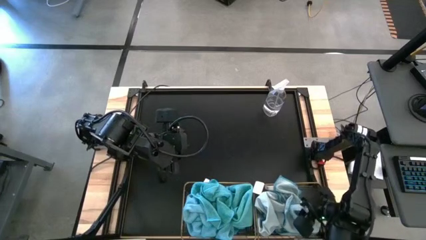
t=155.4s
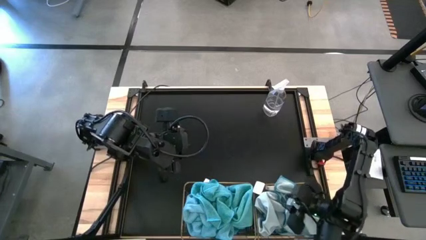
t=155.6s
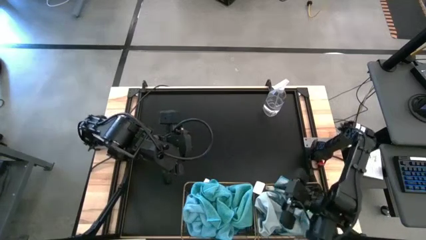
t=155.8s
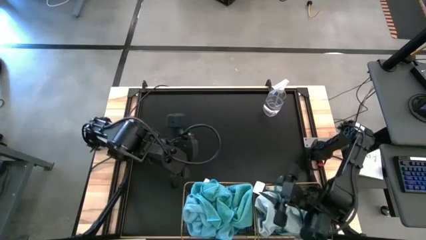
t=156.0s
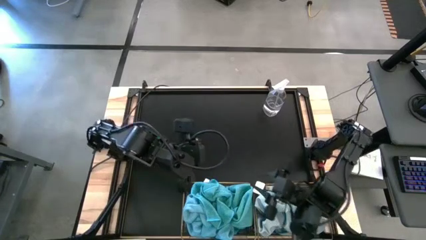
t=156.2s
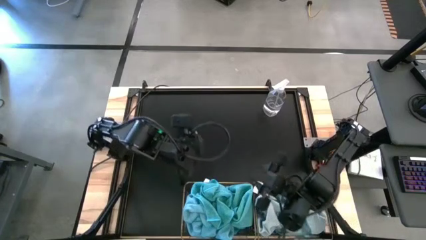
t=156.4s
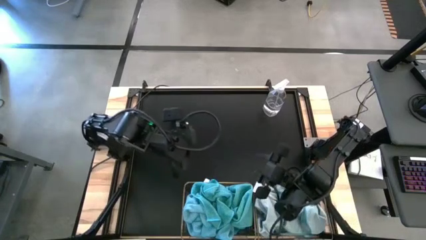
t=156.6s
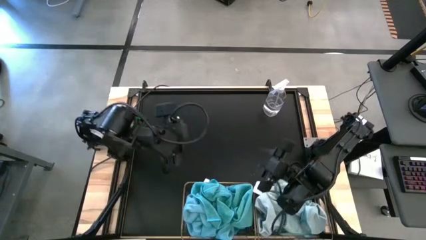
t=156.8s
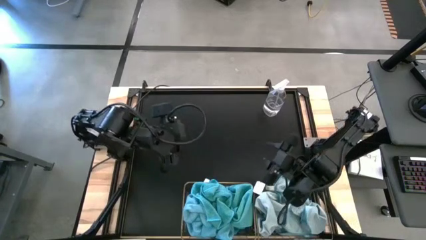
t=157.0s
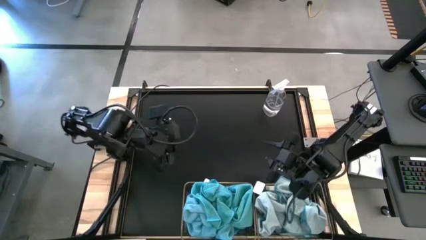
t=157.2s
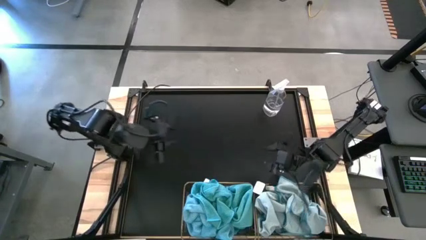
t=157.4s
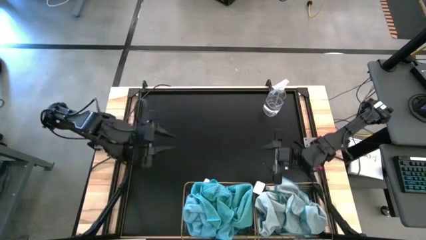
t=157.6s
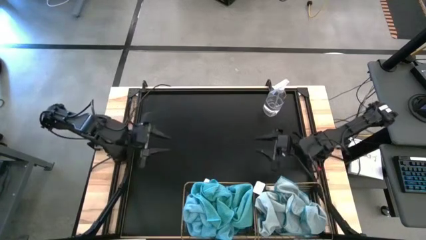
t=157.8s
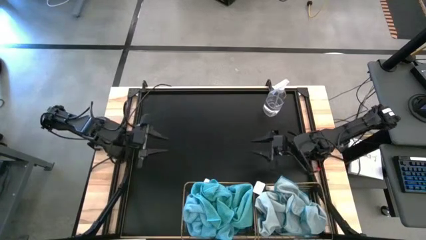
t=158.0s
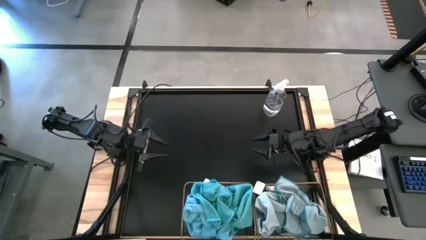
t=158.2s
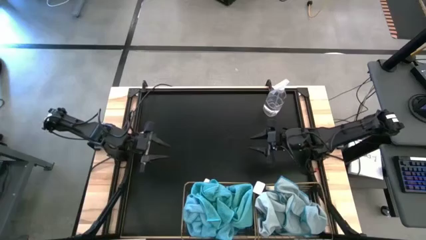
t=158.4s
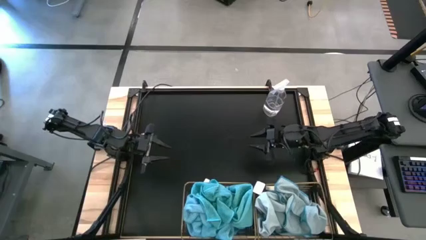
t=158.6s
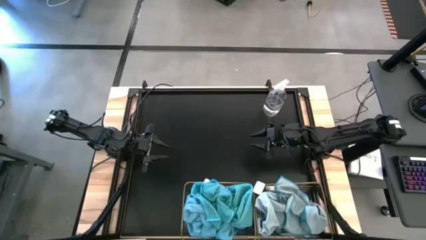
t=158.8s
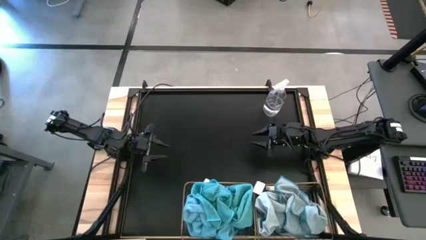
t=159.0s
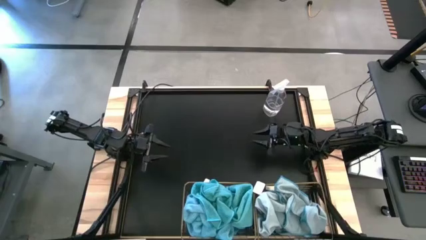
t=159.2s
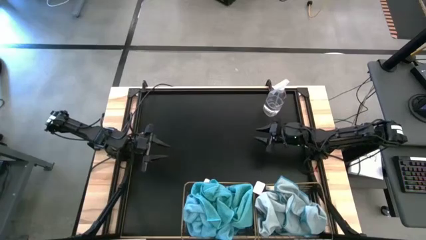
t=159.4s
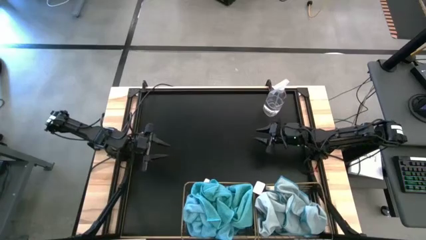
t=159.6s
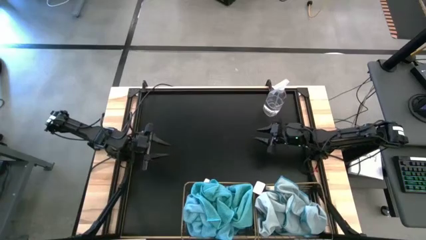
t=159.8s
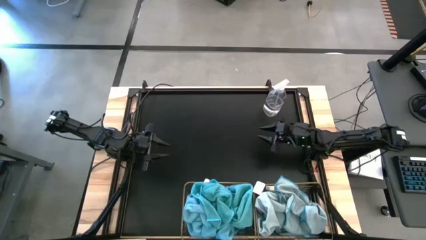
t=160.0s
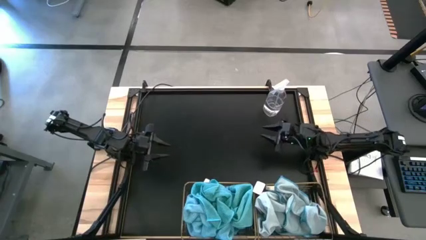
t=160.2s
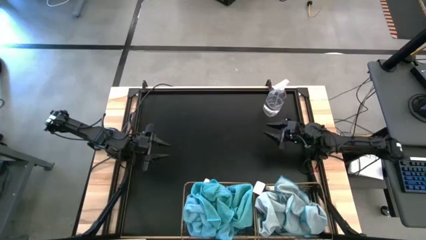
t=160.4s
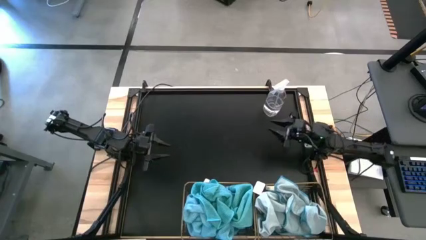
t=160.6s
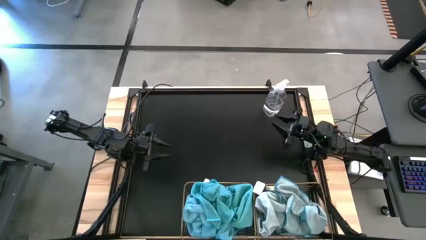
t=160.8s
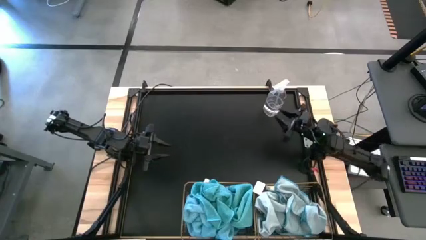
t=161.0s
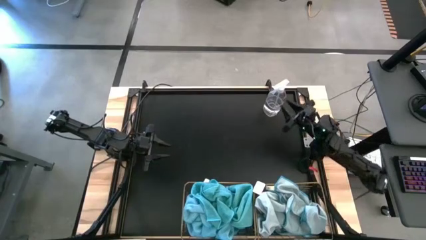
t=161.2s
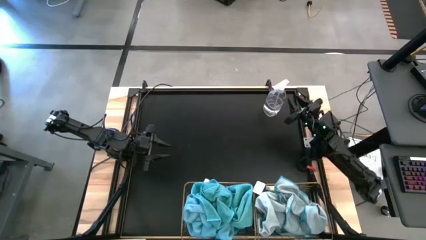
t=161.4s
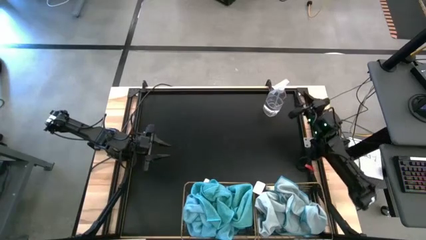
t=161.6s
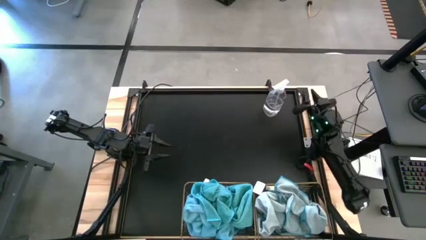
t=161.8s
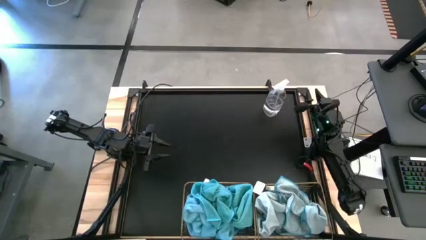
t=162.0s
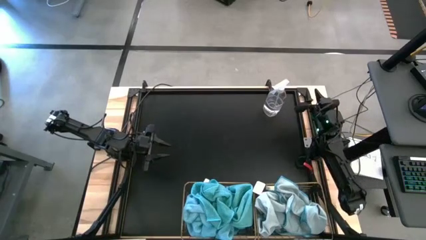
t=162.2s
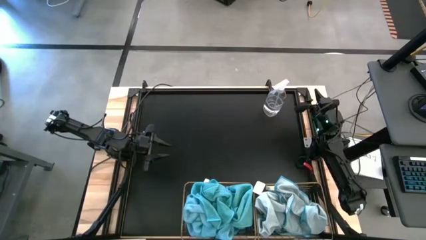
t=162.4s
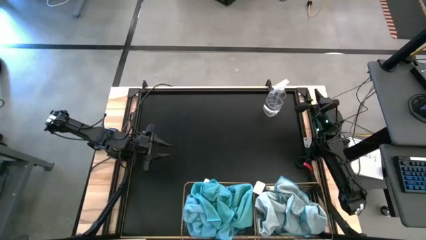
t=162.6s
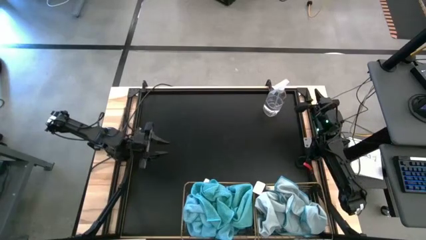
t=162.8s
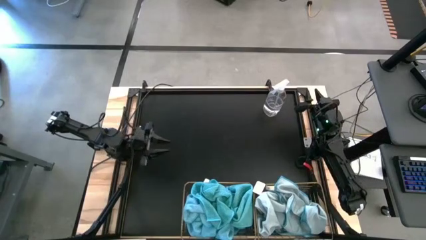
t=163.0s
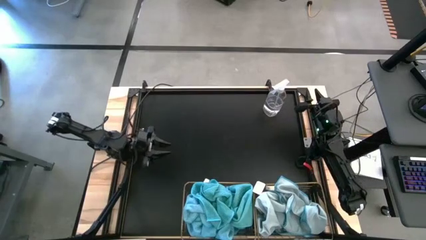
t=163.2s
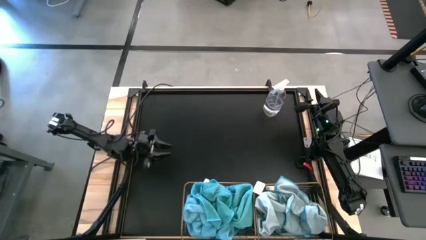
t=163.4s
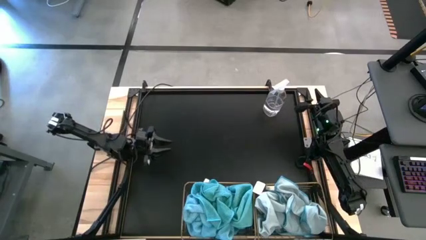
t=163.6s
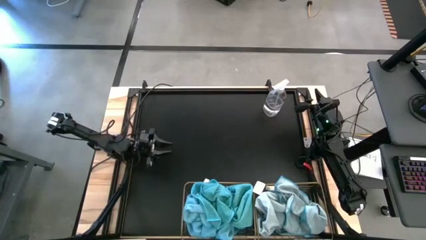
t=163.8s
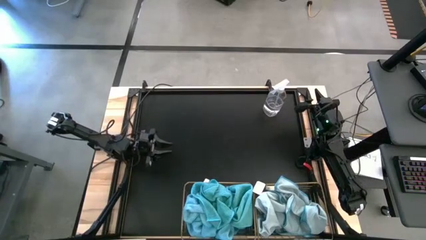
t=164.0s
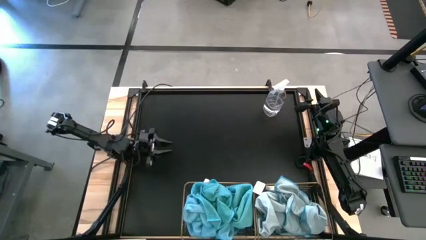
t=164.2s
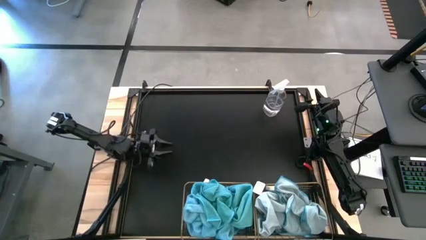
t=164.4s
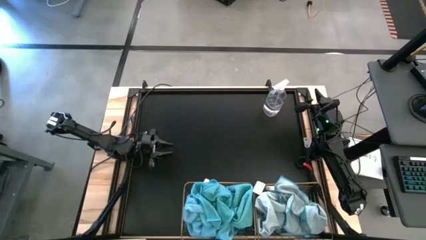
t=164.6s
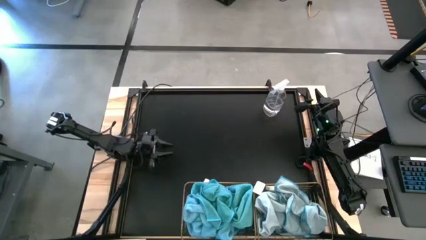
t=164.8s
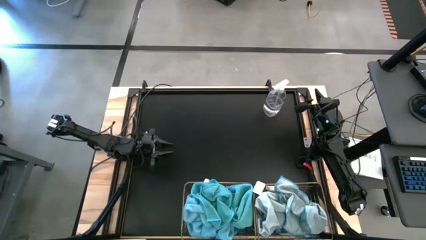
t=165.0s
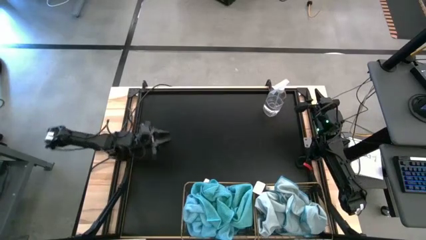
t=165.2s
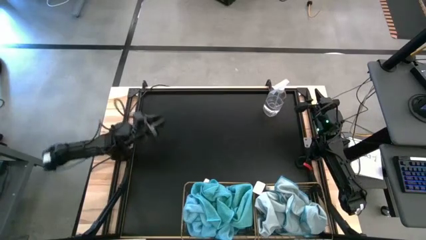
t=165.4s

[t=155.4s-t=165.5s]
Task: Sort microfiber towel by color & place in baskets
Return to Home Position
